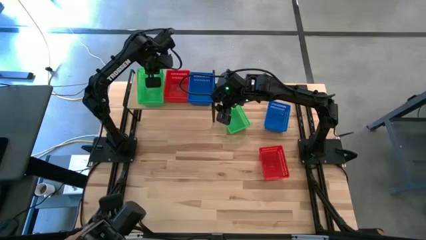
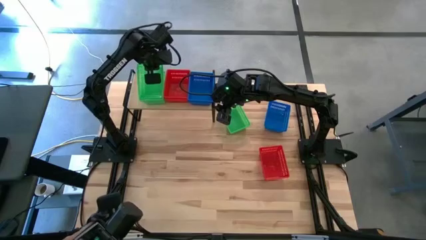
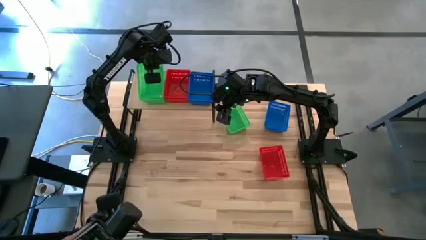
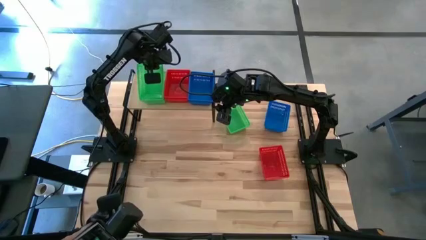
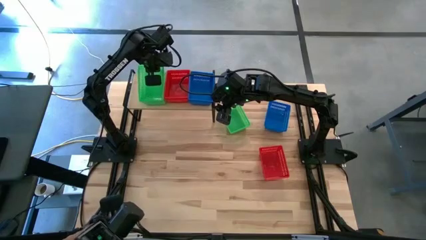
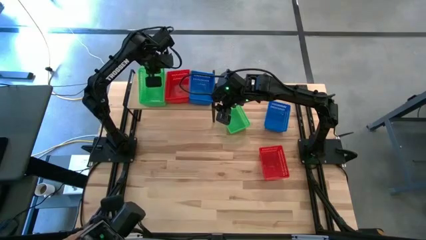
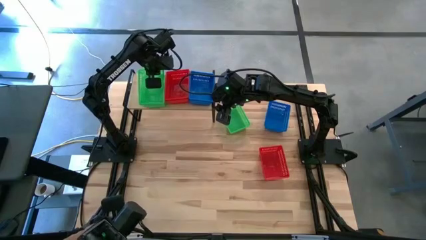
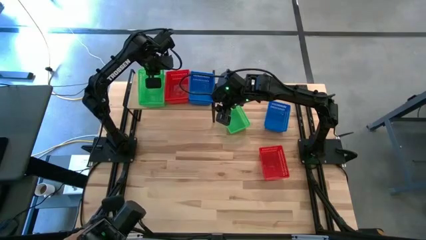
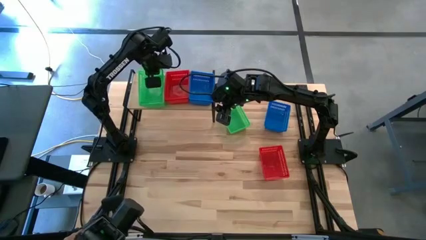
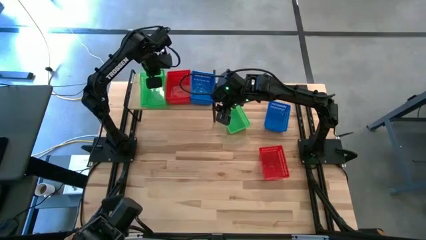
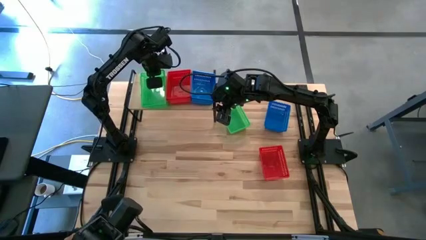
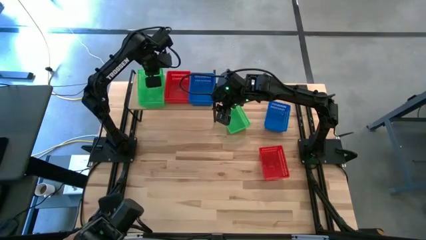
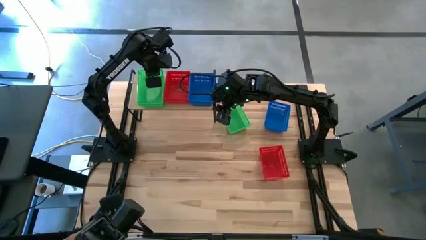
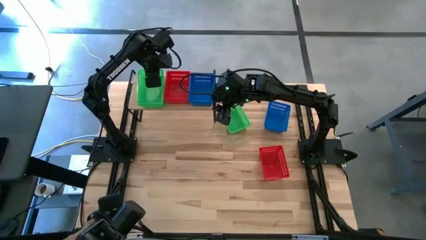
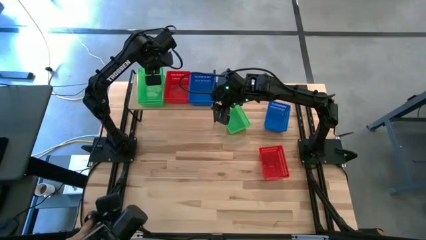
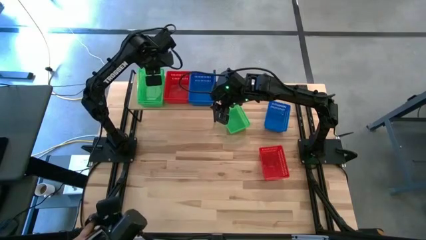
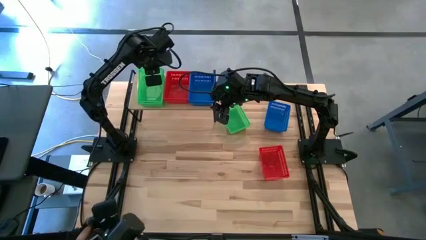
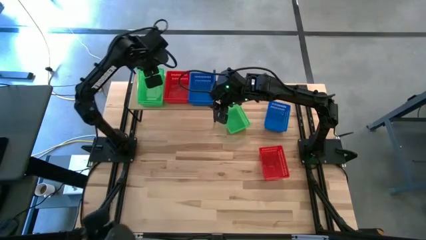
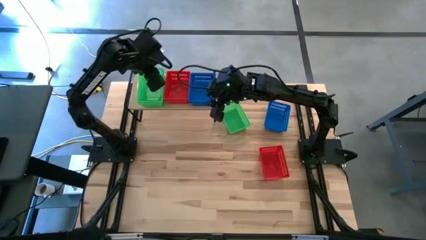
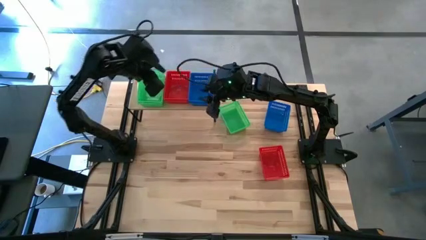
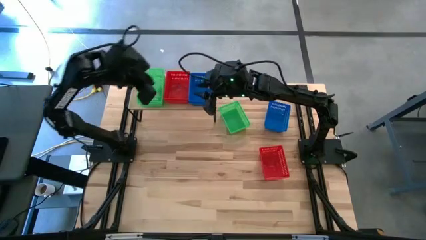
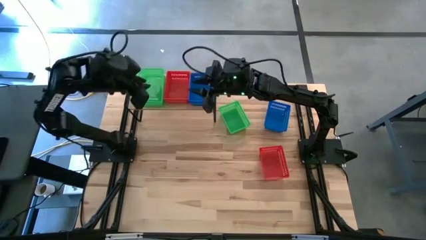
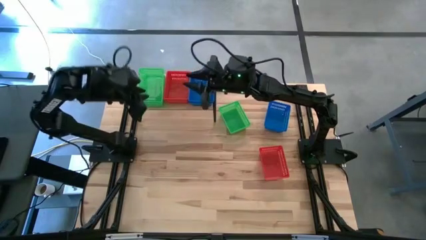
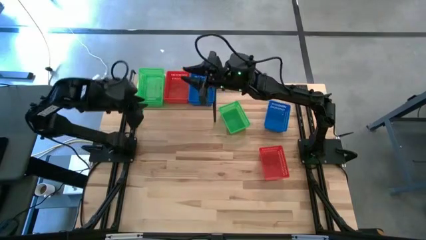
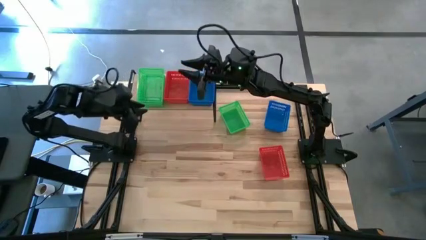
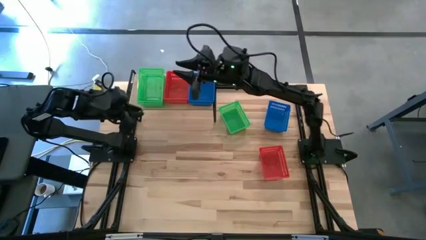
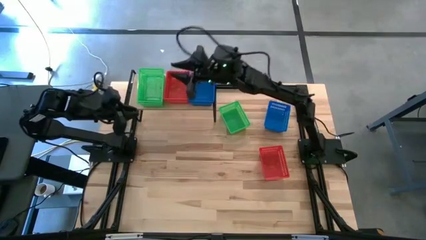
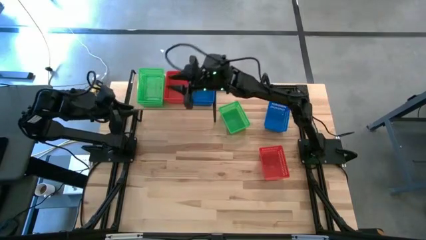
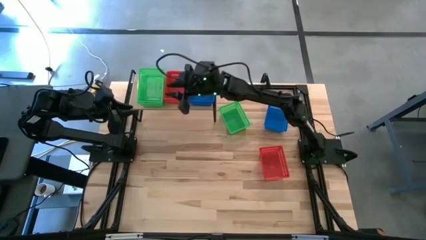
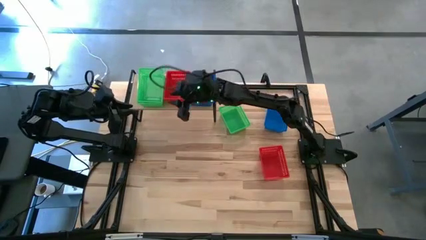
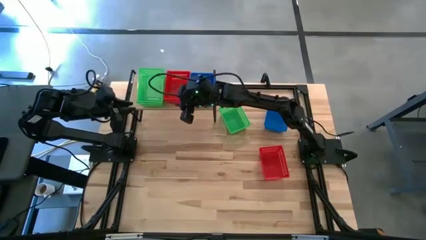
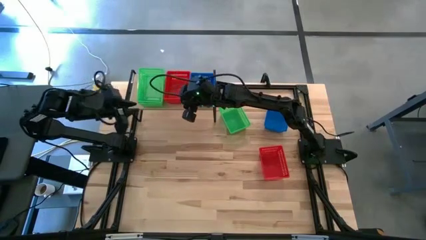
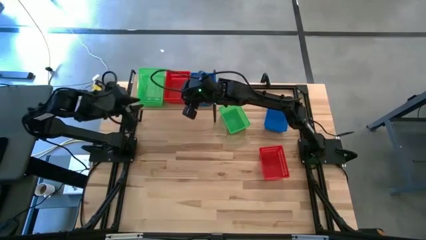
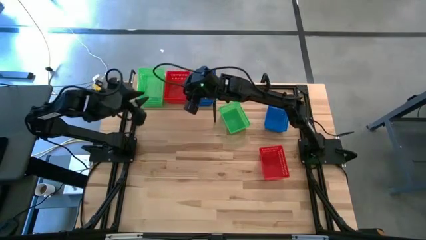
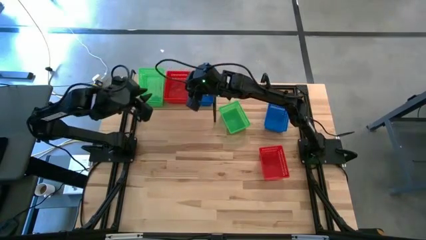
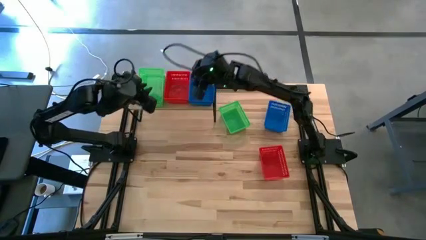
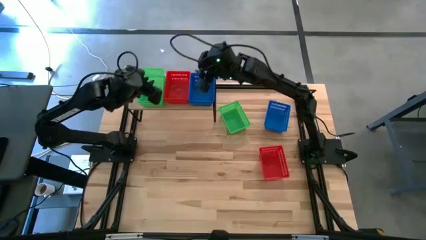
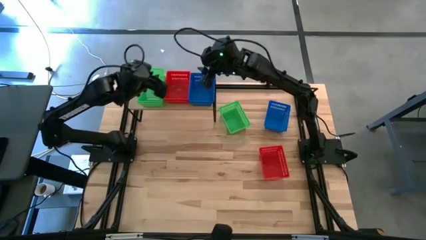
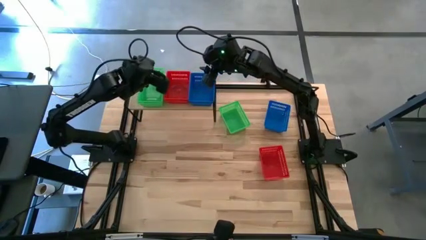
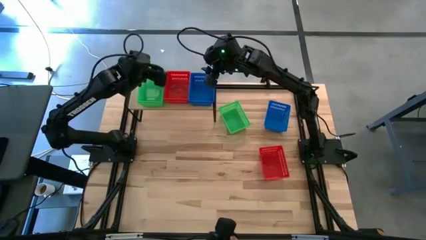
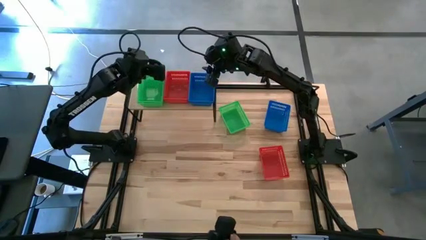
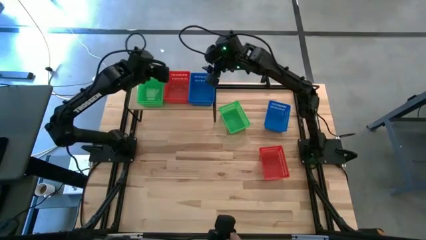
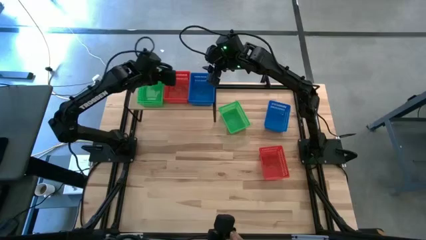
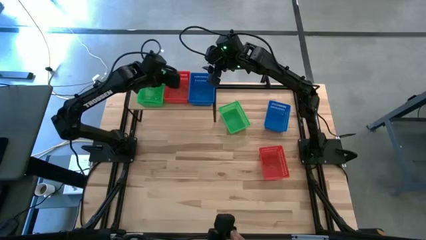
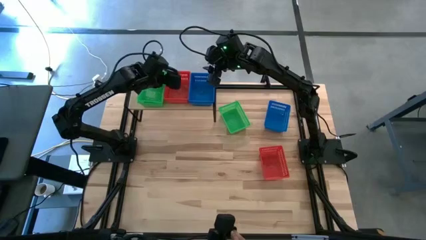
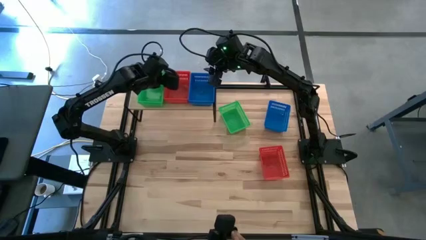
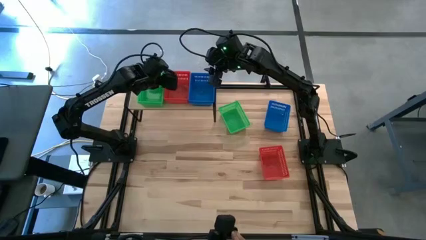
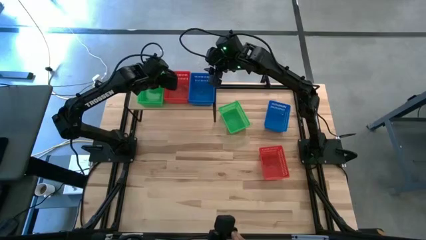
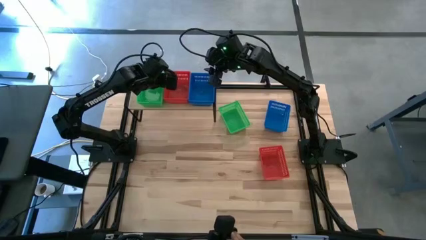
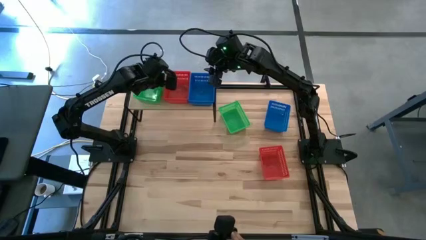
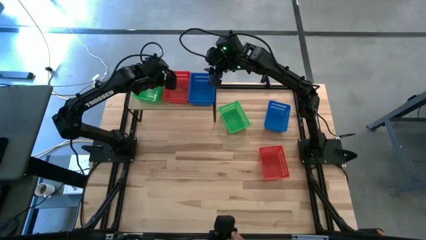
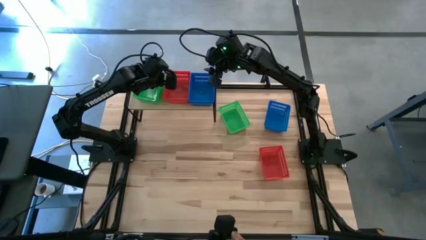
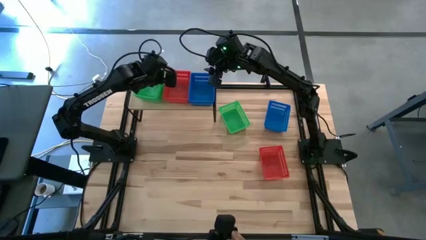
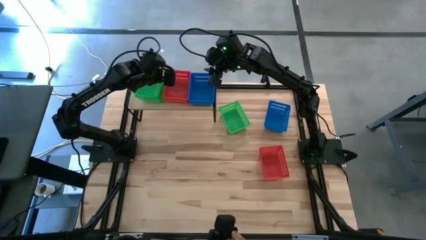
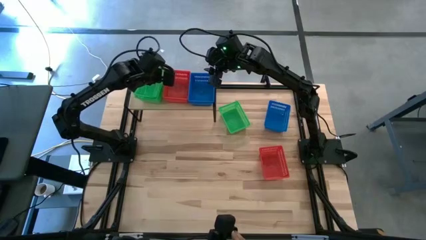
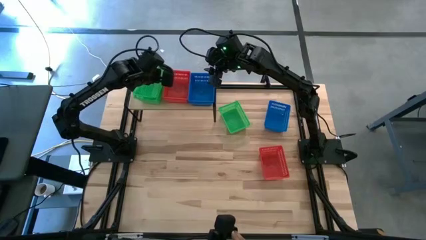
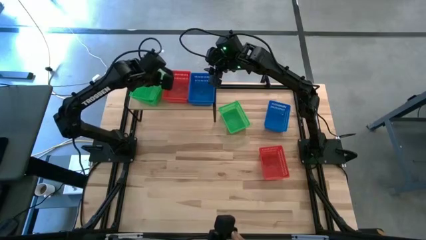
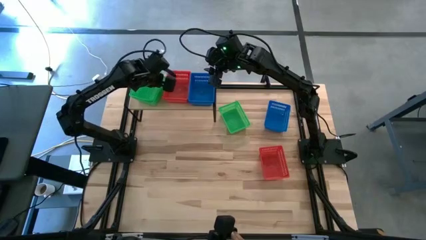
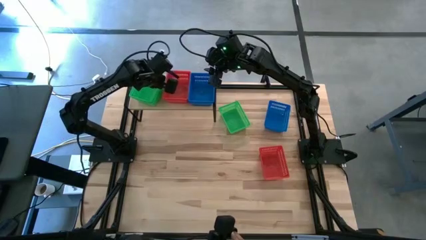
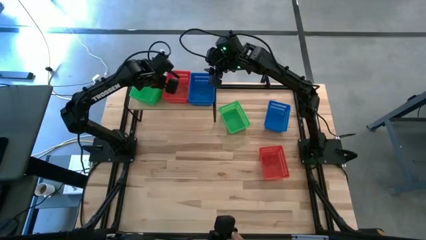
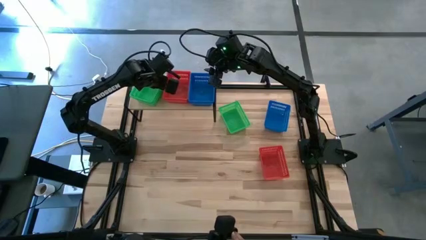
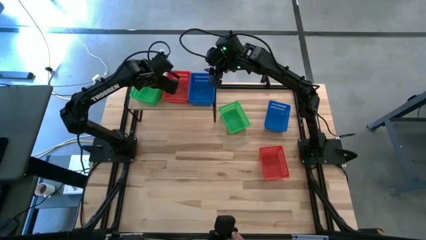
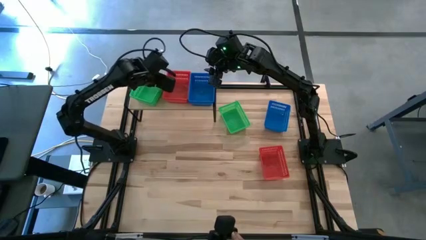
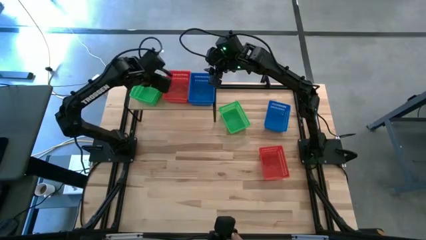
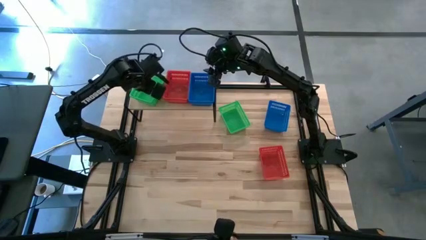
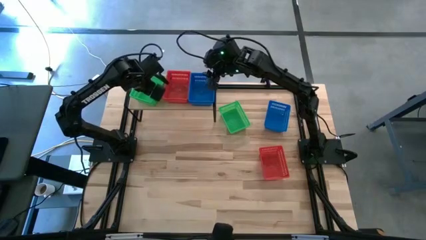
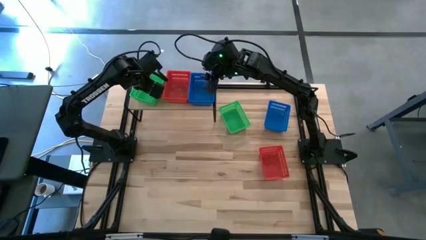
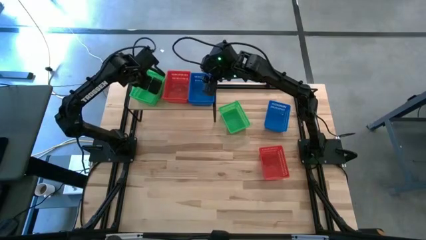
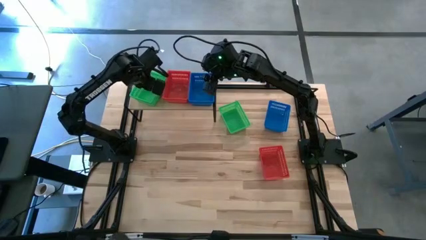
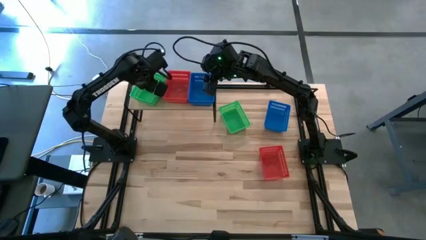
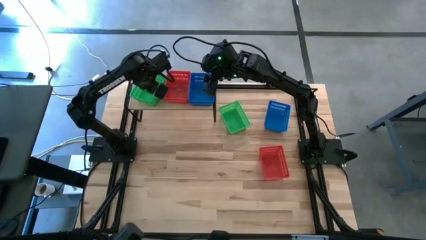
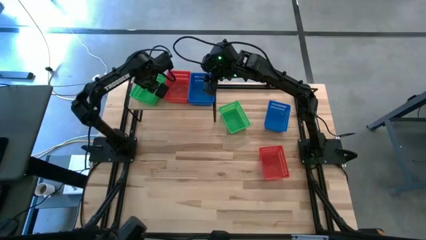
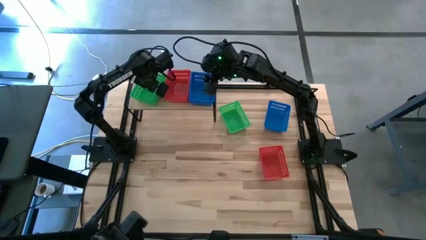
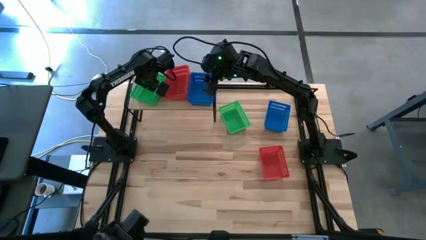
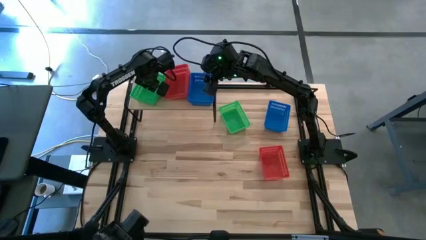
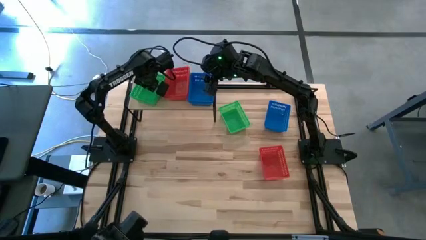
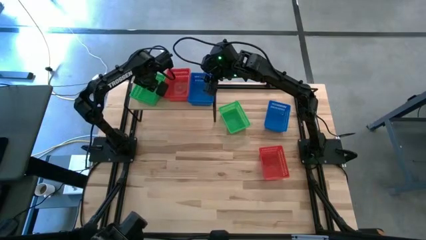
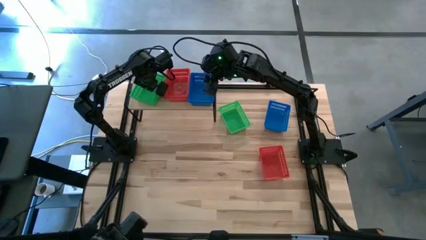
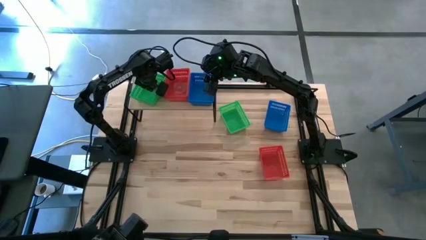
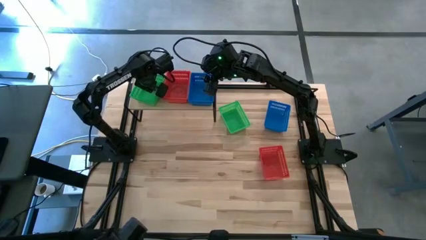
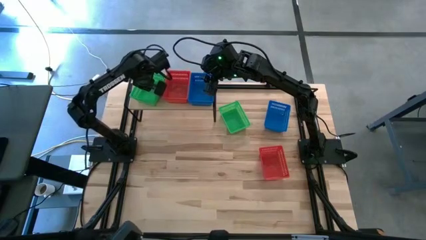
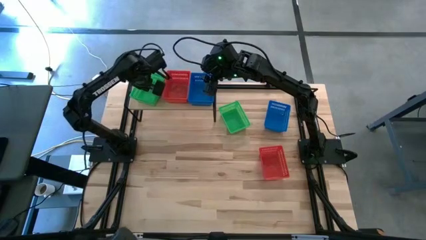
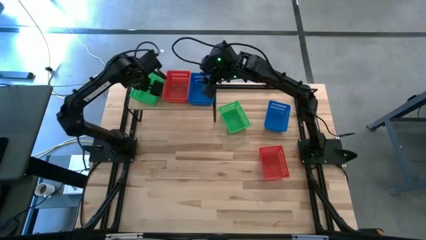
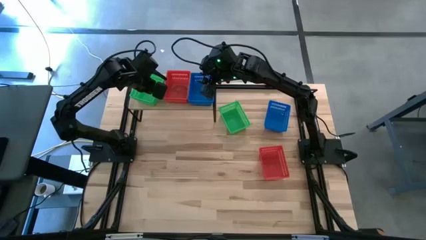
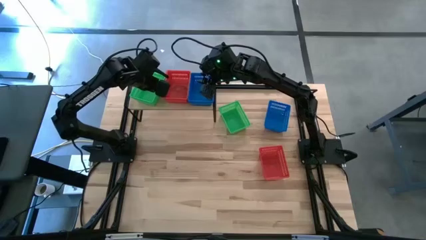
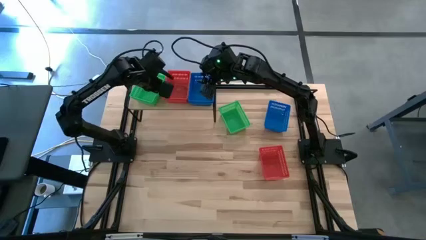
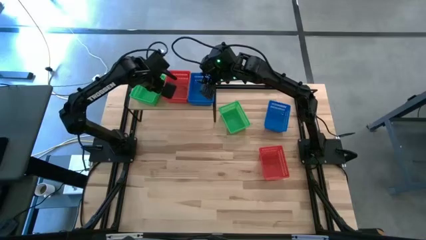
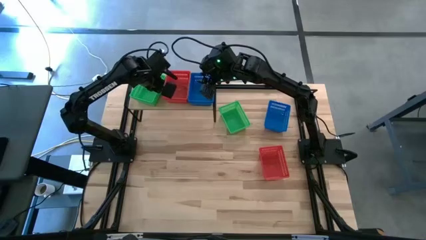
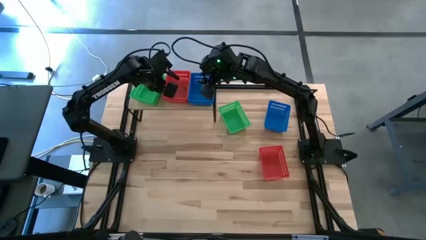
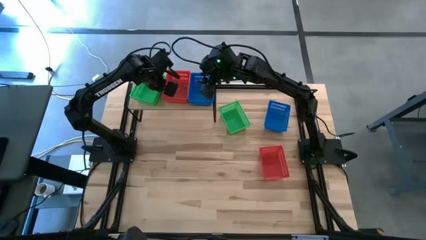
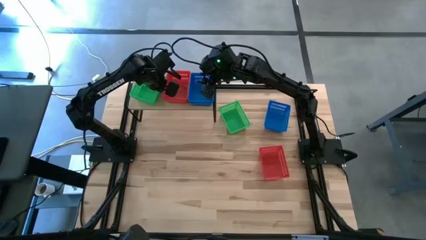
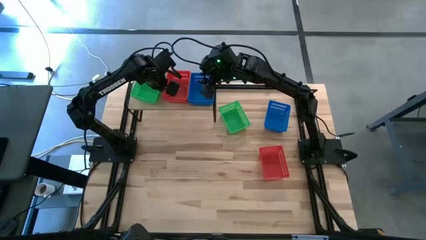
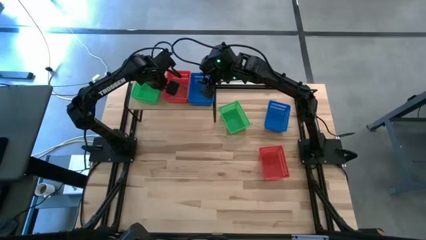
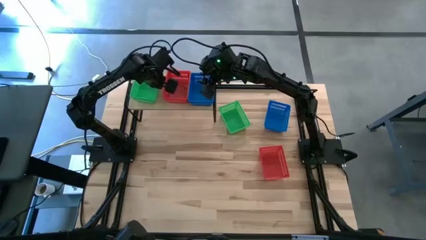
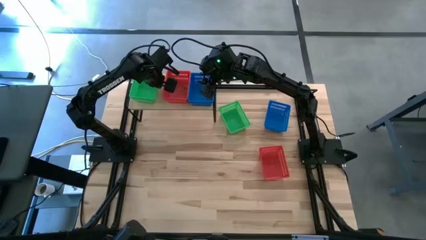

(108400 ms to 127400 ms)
Task: Stack baskets on shelf by color
Stack the bottom green basket on top of the green basket on the shelf
